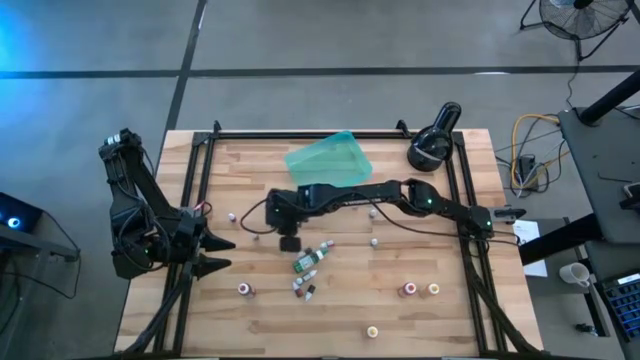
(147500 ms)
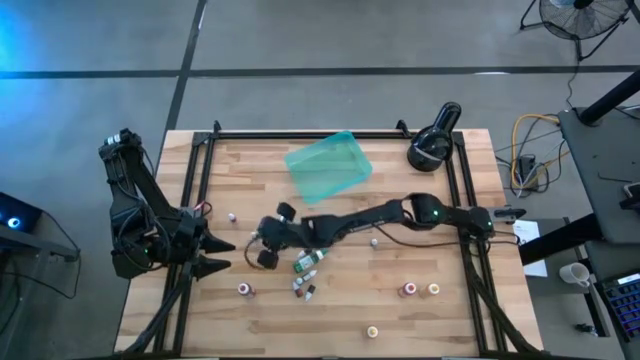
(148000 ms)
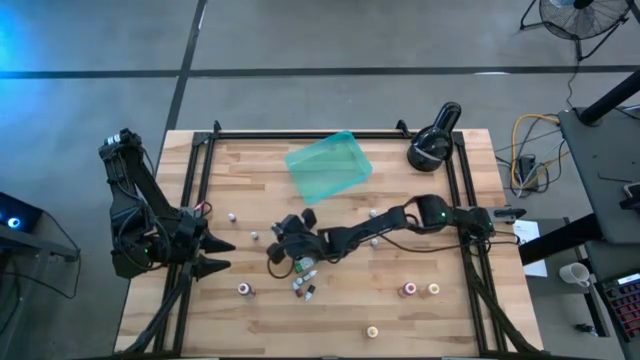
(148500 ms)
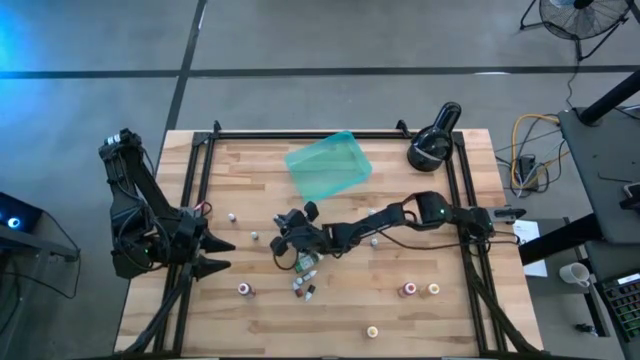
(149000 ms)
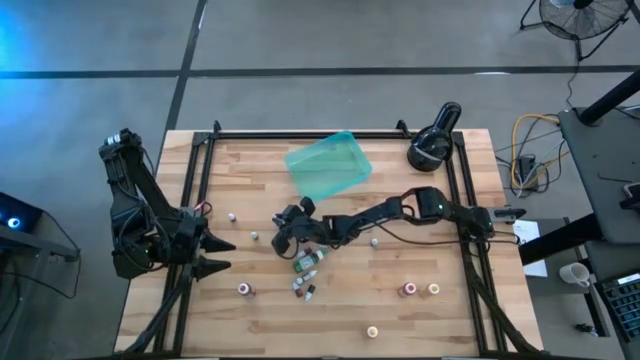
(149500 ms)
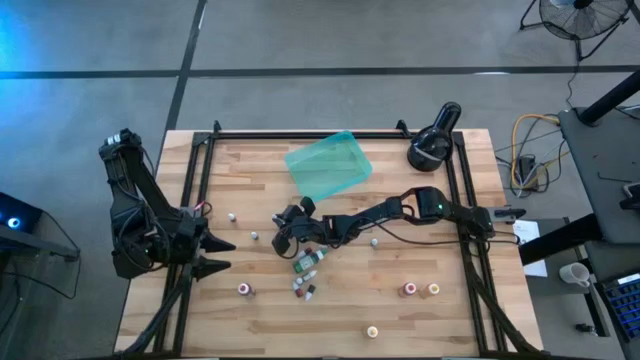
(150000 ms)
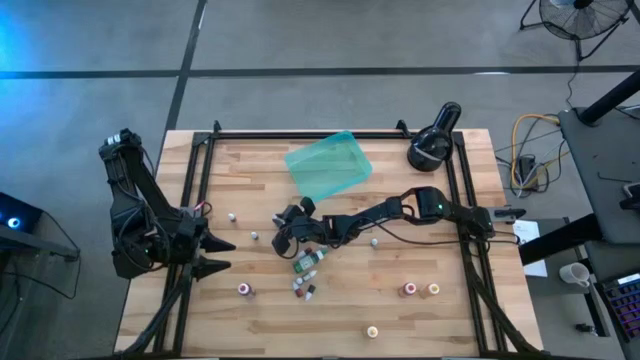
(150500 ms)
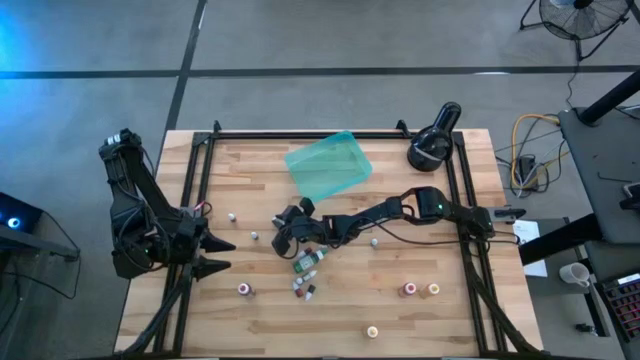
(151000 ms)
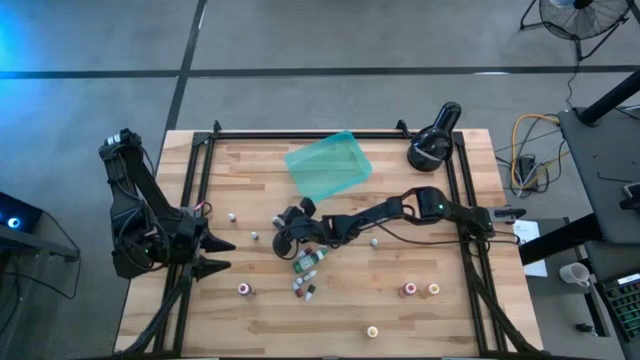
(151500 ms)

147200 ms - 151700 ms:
Task: Pick & Place food coloring
Adjust the violet small food coloring bottle

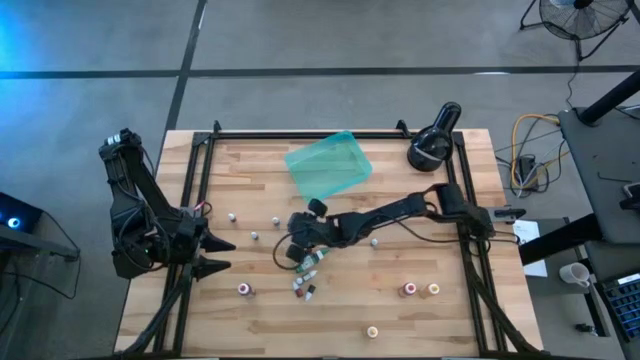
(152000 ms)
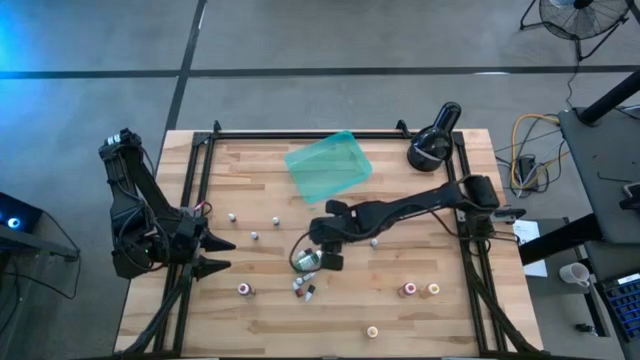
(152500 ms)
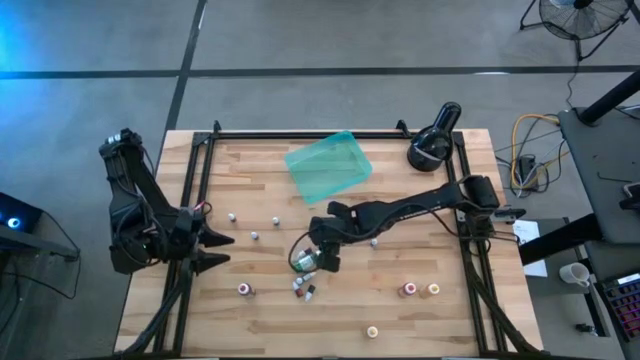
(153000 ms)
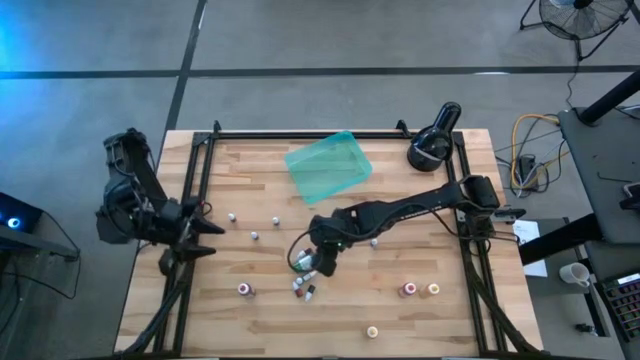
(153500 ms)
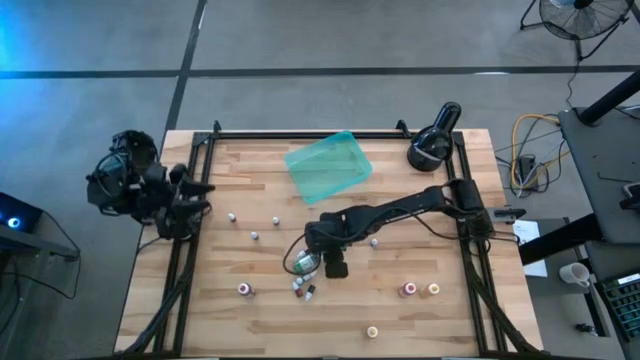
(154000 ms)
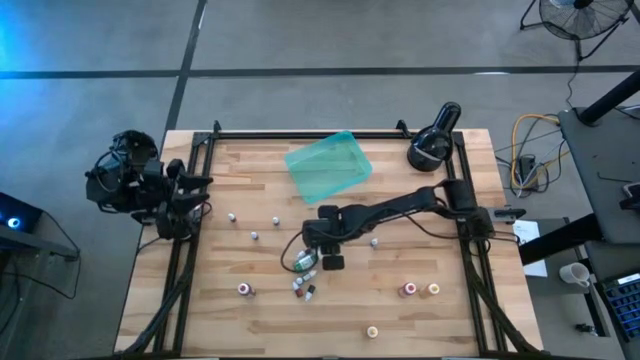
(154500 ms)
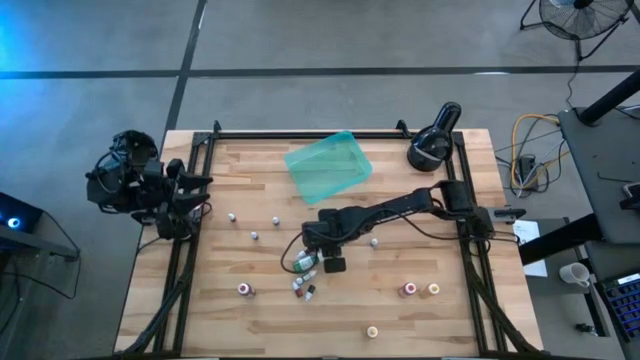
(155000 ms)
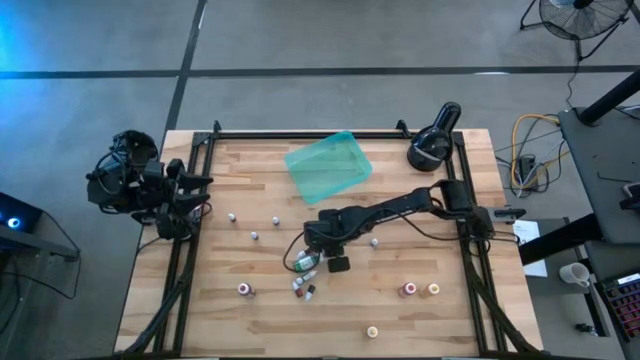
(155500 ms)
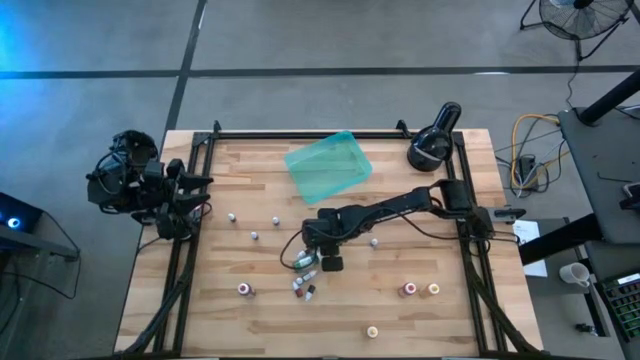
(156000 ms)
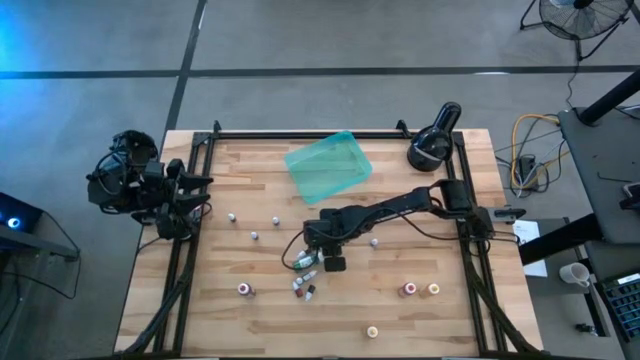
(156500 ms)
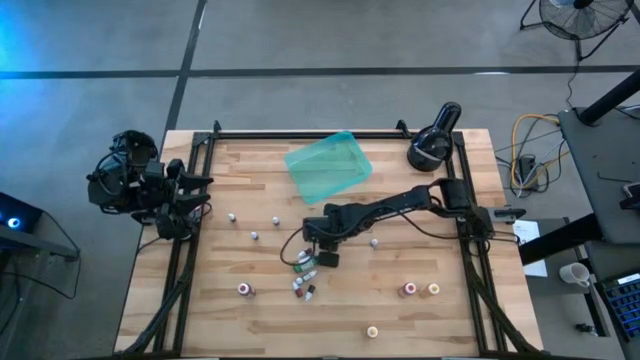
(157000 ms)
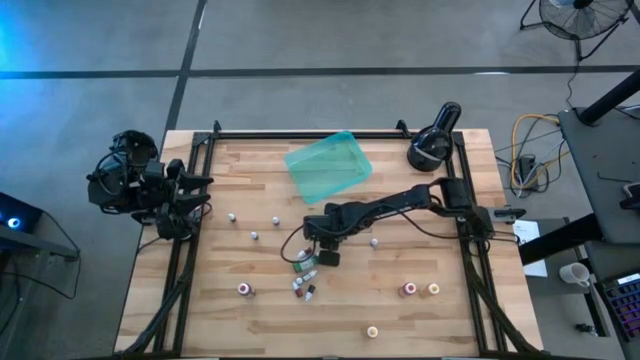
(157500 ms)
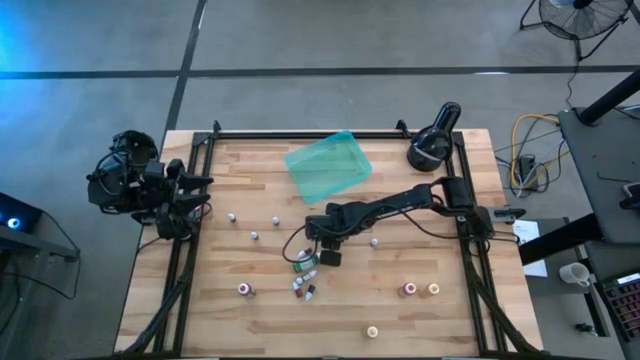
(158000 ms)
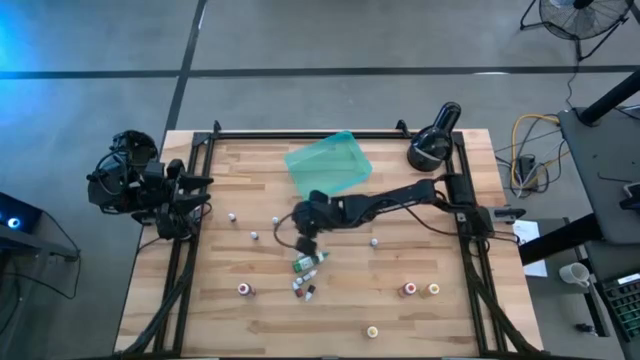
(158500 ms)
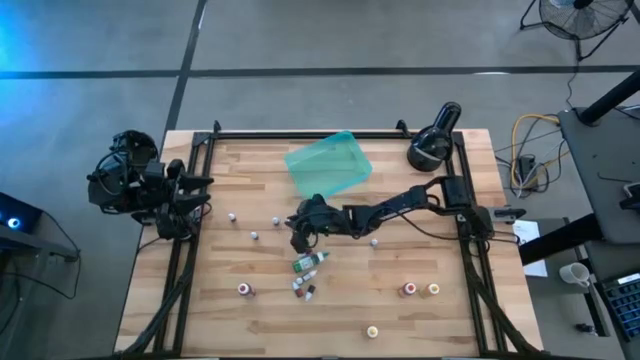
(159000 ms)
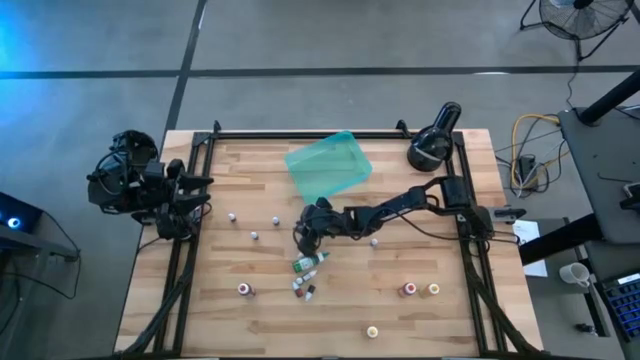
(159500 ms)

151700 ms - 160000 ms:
Adjust the violet small food coloring bottle

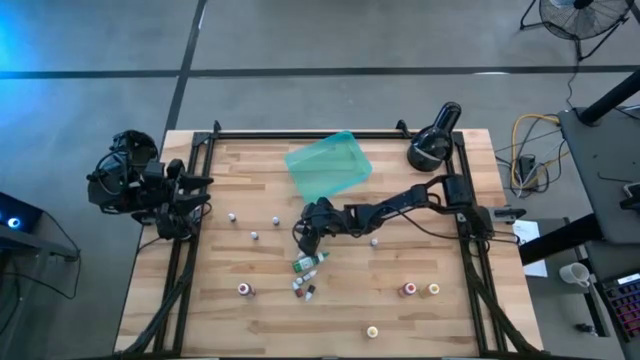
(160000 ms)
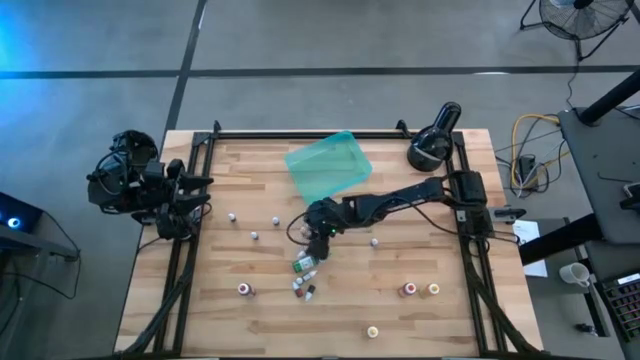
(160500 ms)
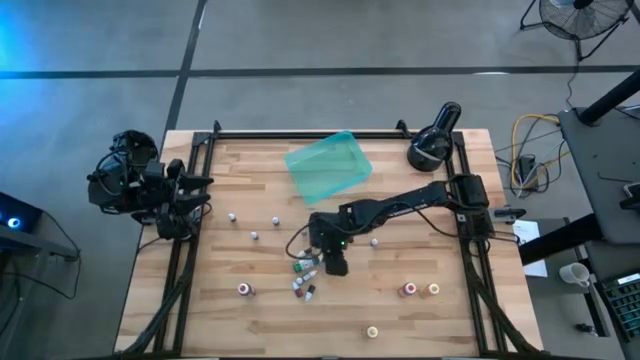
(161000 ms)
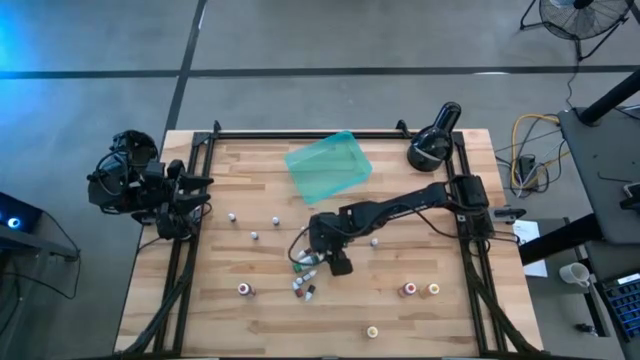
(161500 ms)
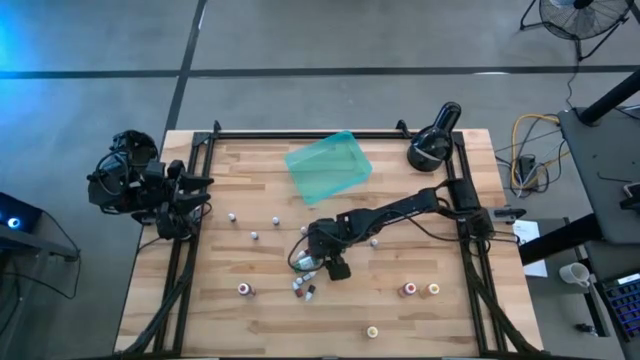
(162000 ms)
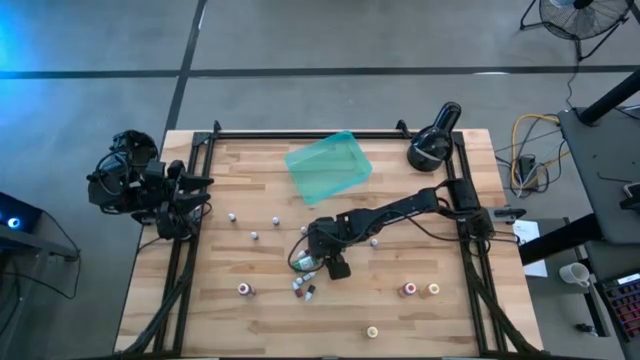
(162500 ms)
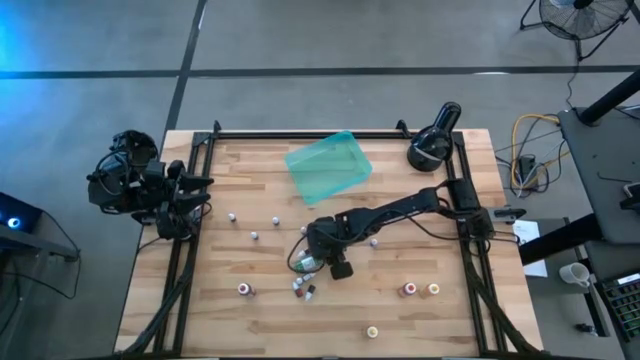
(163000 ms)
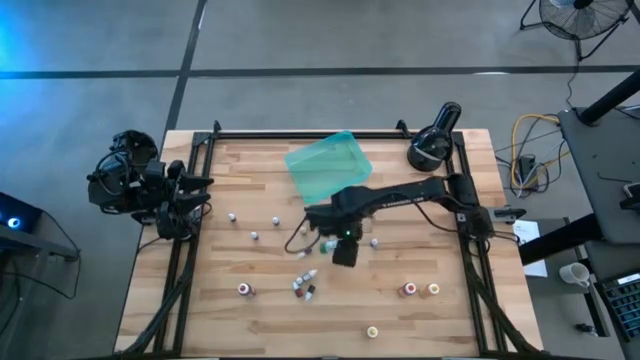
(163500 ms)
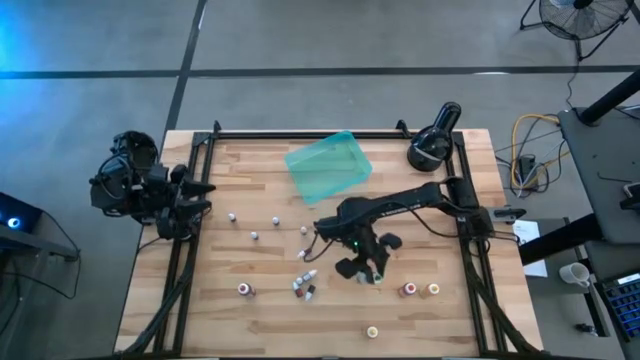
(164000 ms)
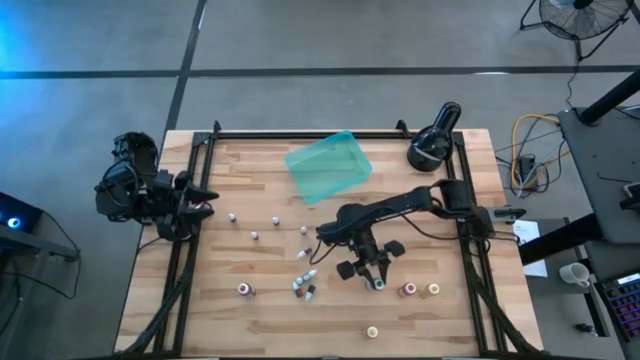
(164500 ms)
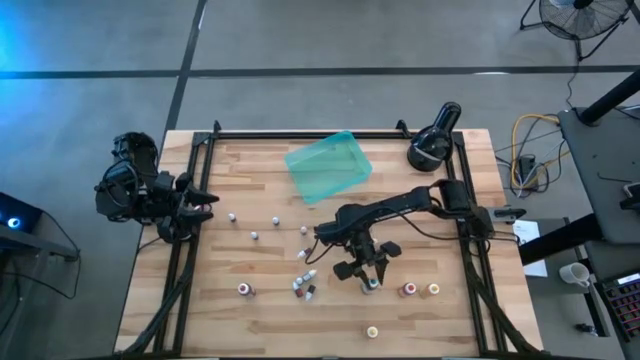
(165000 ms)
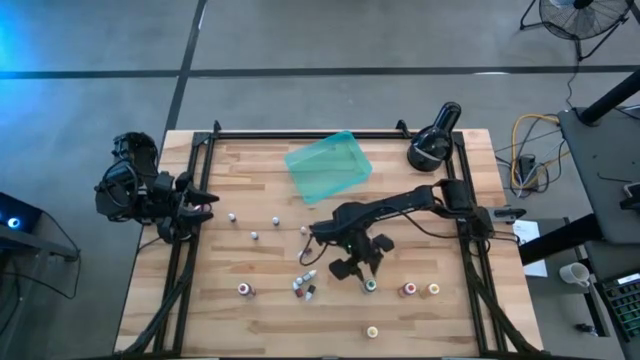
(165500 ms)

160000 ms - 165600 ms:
Adjust the orange small food coloring bottle

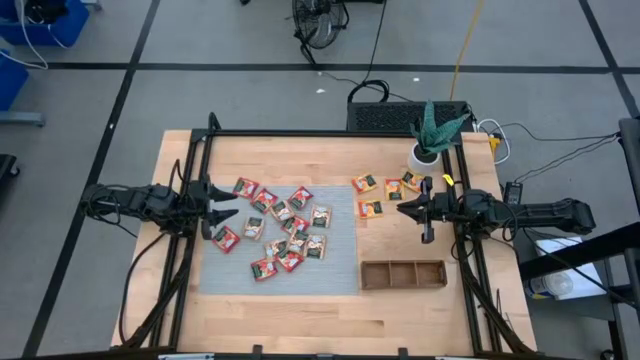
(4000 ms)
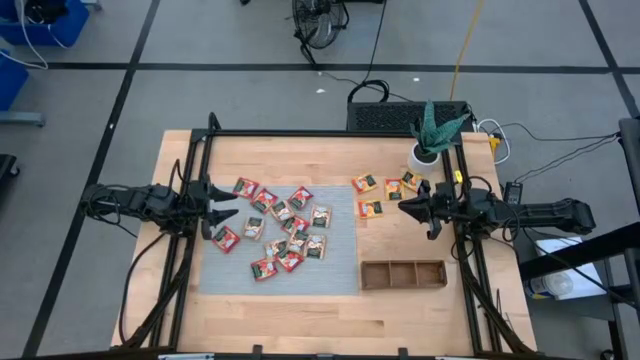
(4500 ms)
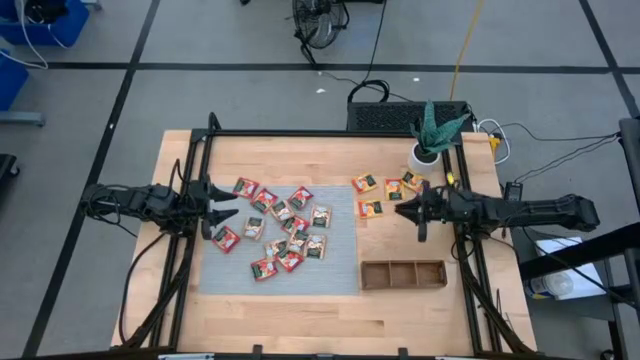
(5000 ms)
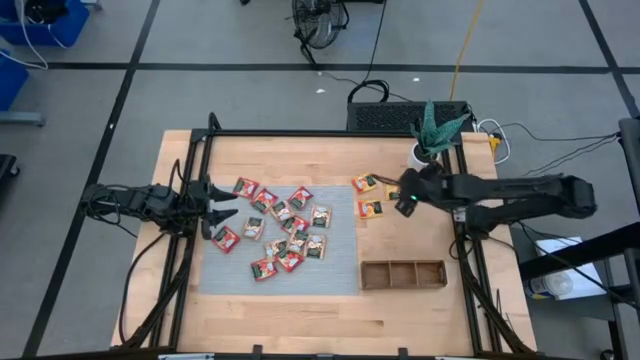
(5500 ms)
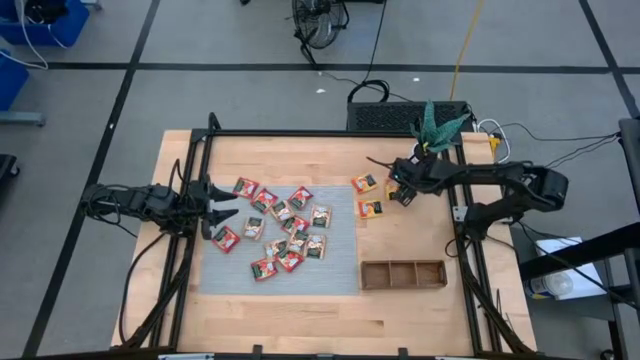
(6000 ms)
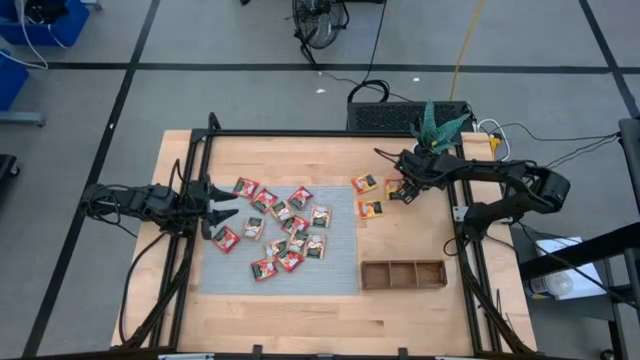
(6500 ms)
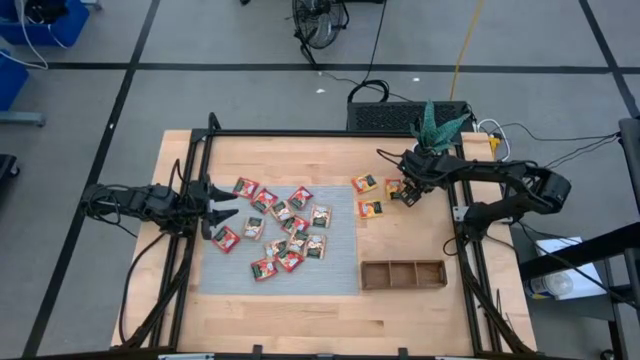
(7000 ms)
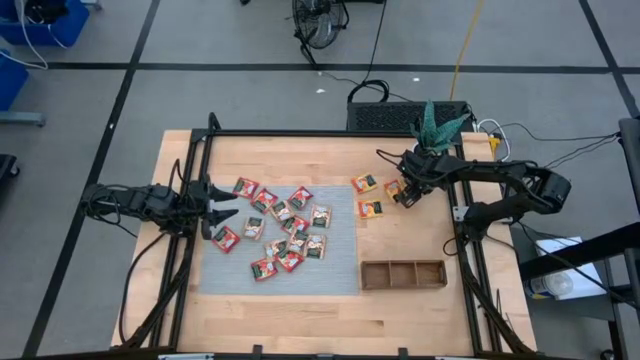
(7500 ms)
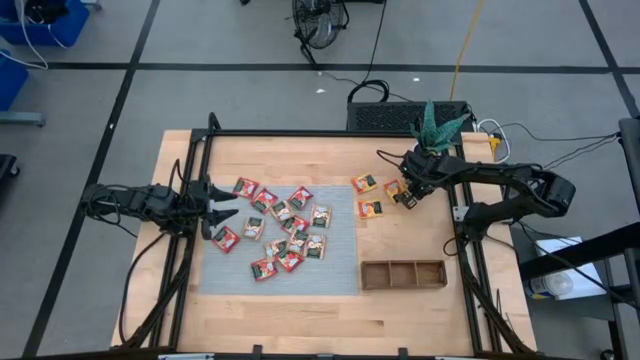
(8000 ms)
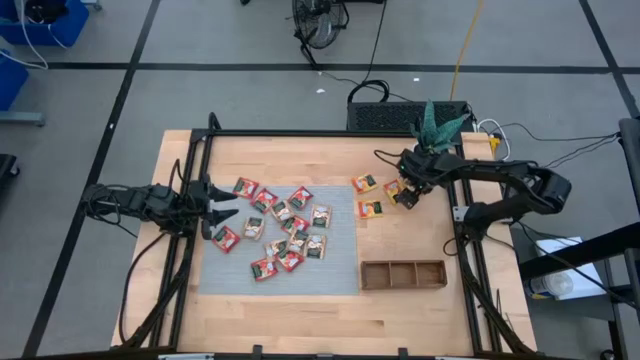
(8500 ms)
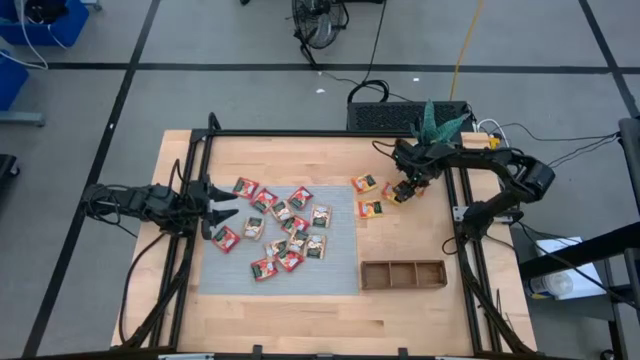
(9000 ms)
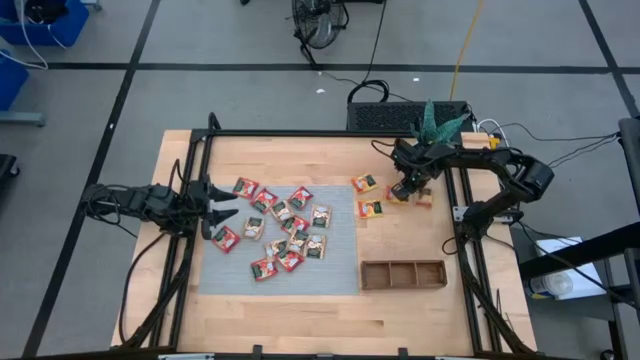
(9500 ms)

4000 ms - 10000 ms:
Task: Pick & Place Tea
Put the yellow tea bag into the right section of the wooden organizer
